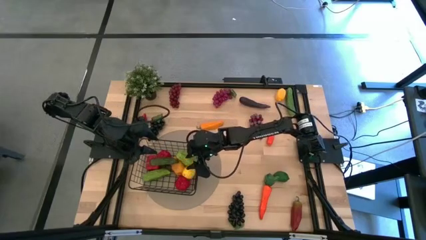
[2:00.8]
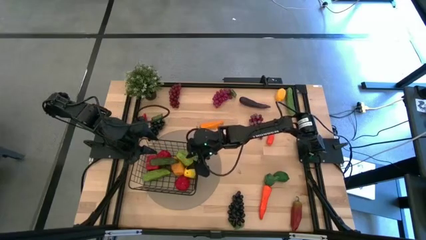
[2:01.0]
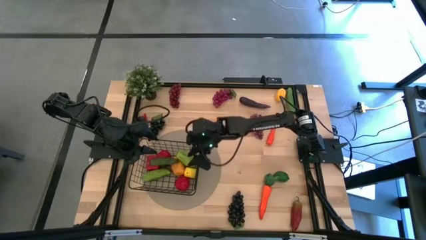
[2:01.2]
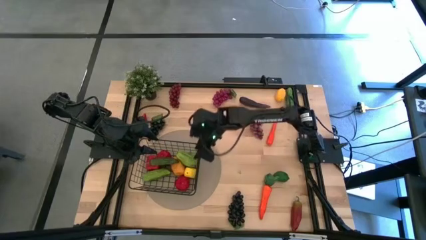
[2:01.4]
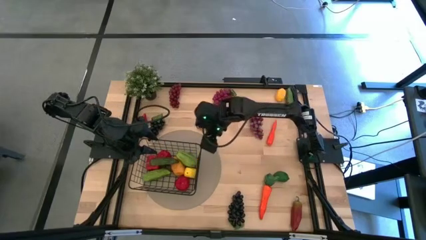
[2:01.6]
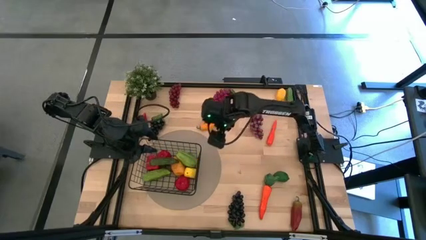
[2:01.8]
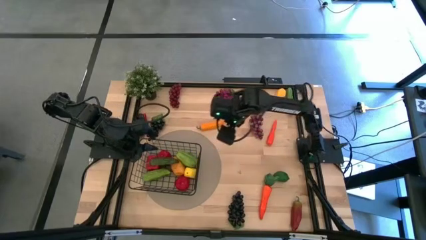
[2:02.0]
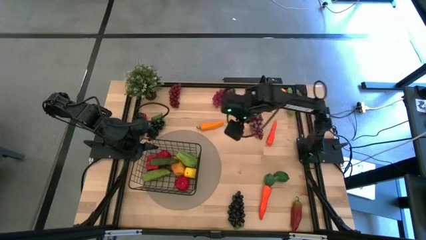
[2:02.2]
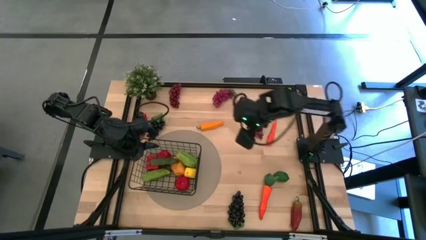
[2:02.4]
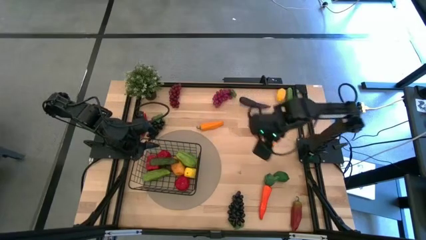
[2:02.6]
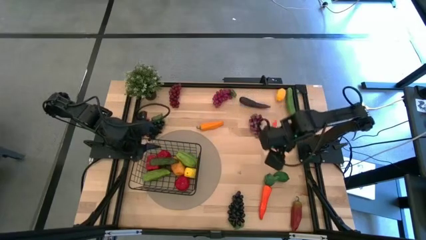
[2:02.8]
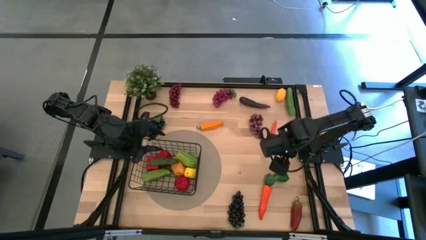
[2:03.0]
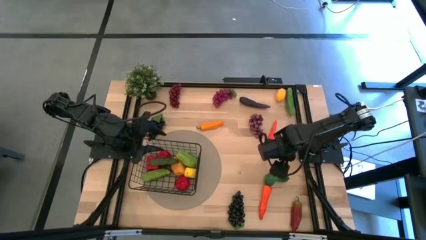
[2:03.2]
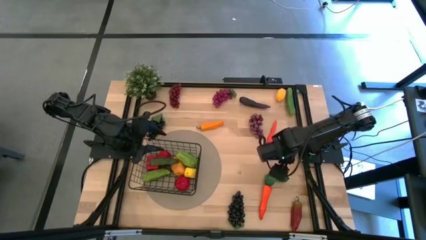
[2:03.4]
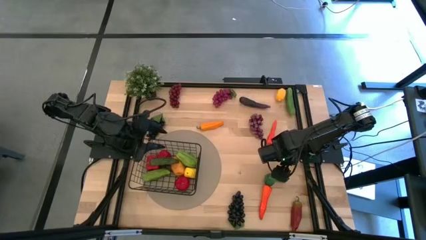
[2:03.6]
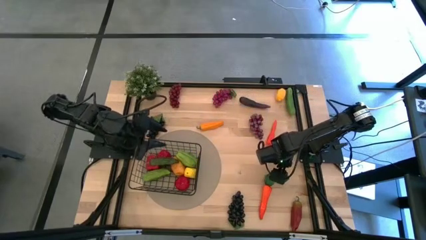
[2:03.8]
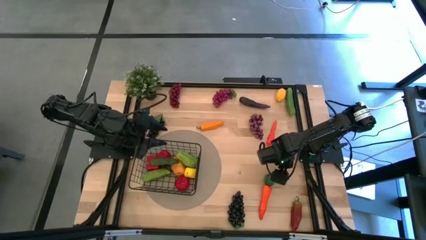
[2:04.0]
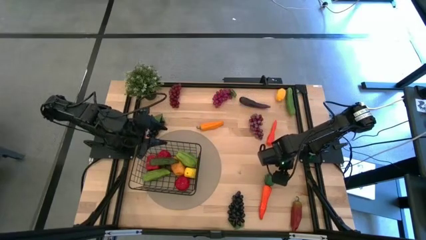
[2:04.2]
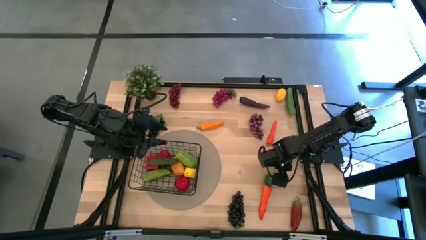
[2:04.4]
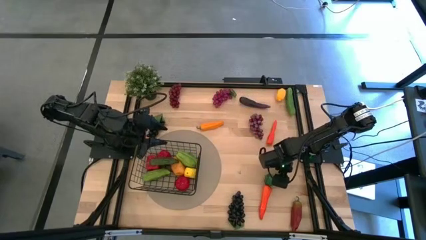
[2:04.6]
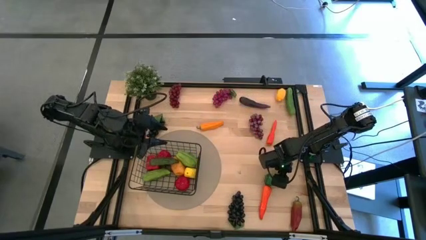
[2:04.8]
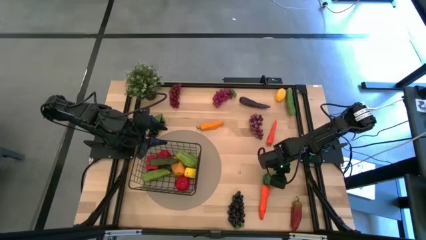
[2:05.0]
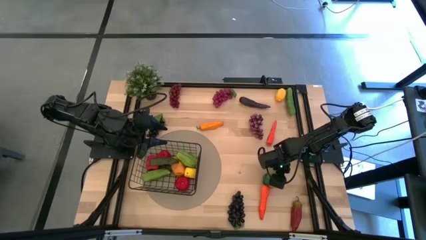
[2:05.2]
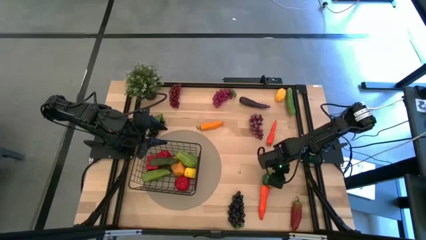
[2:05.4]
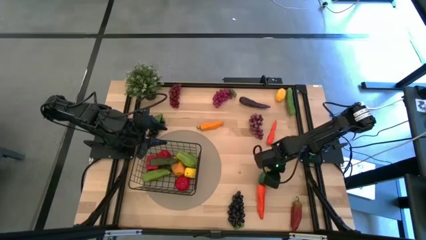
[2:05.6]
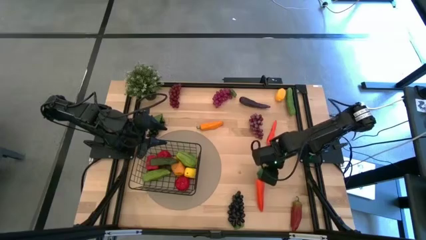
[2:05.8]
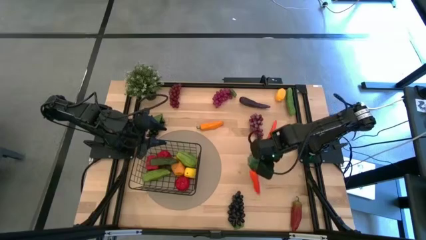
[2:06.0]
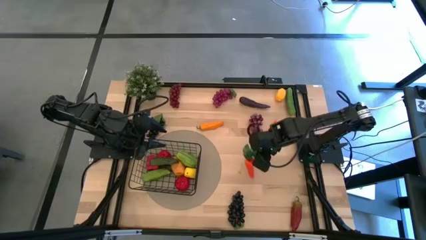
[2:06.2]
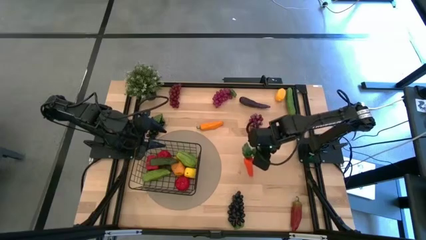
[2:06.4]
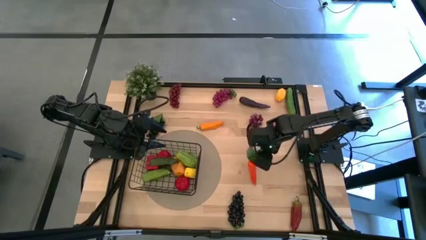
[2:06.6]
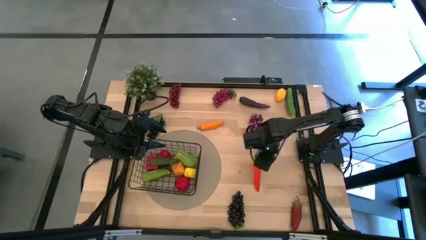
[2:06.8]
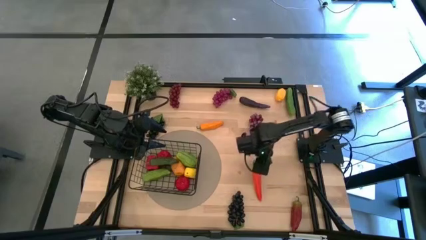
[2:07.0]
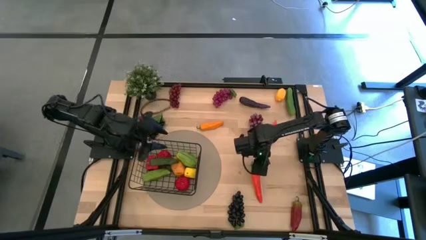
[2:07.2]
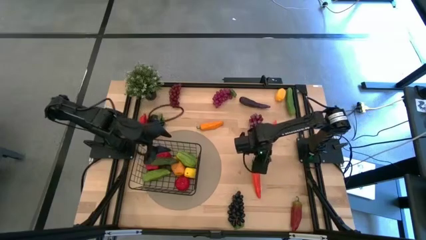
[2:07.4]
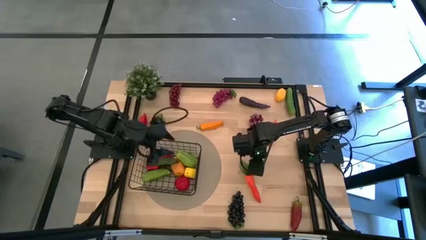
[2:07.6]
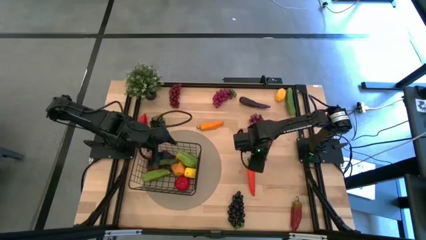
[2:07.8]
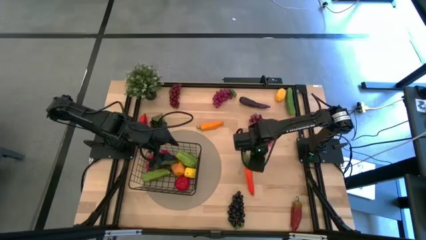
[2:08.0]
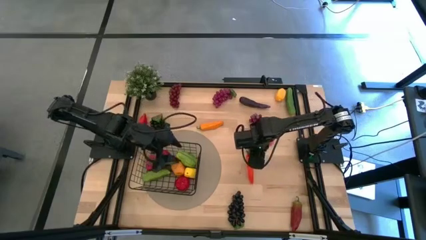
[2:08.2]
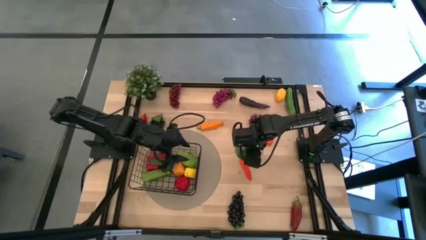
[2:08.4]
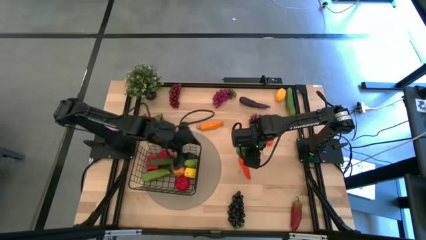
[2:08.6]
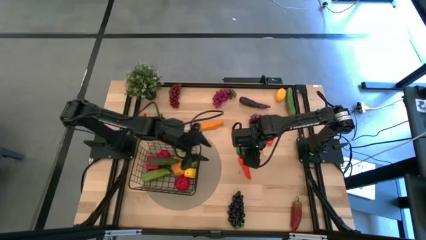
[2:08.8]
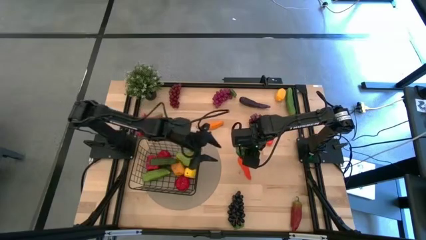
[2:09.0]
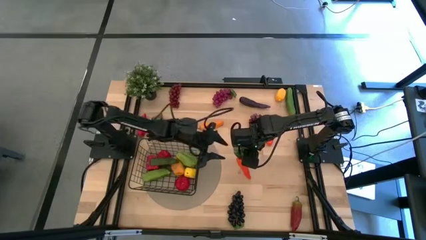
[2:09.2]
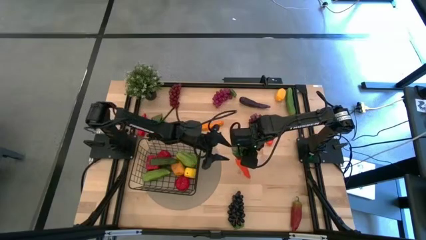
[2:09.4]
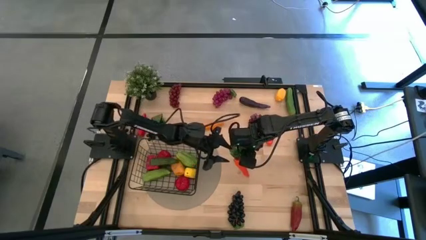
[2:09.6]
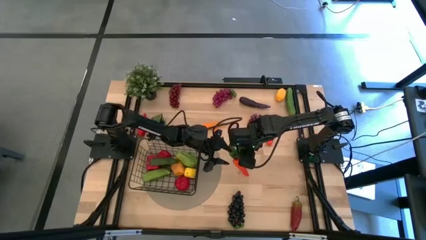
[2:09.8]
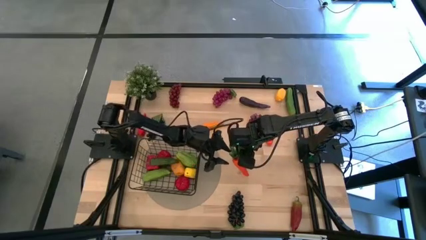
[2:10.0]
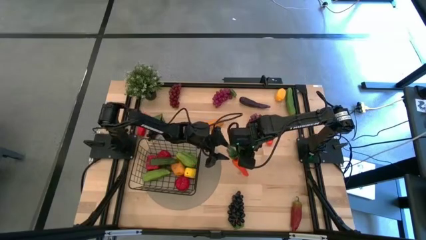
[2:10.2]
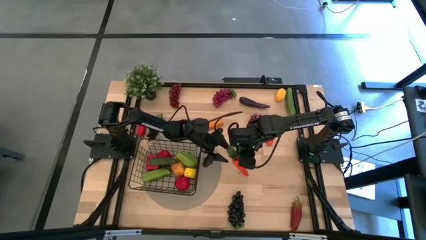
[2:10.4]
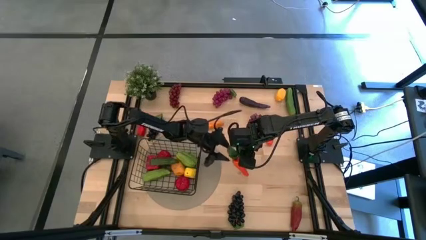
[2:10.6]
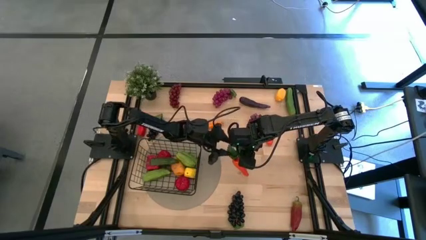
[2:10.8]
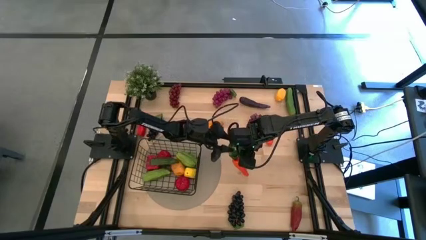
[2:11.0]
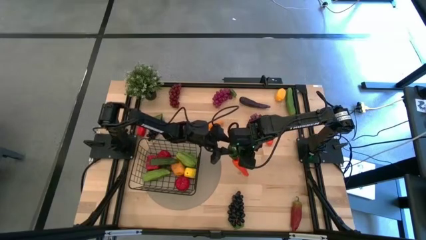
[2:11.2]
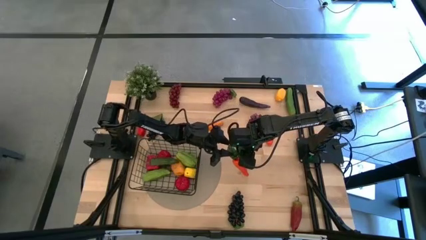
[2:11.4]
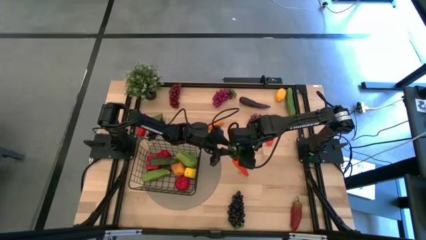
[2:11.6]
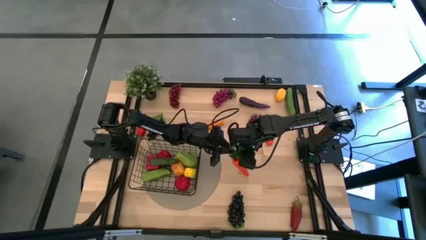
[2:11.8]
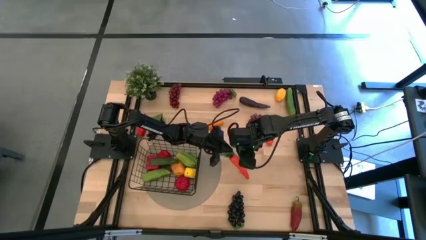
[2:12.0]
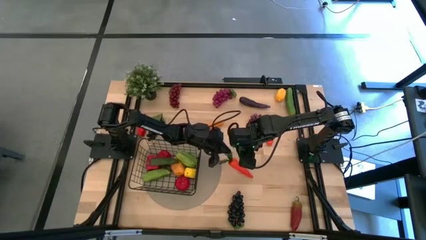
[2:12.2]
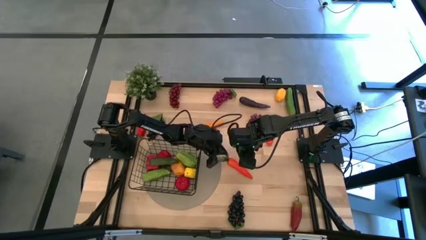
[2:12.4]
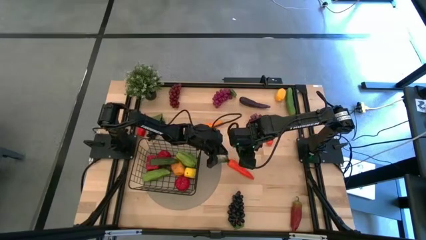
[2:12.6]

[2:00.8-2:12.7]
Task: Build produce basket
Put the green lime into the black wire basket

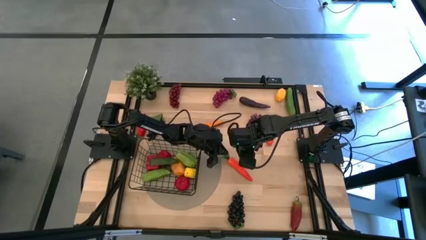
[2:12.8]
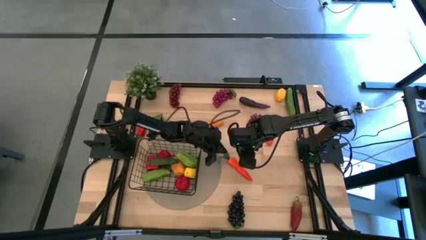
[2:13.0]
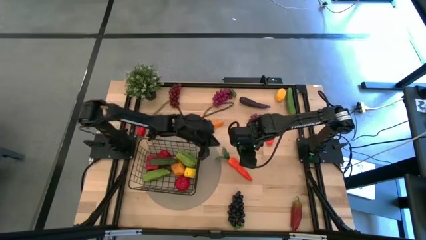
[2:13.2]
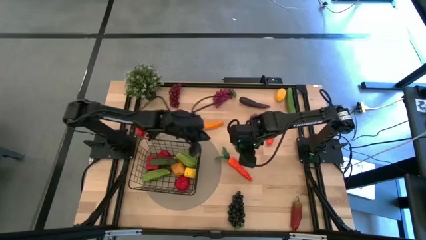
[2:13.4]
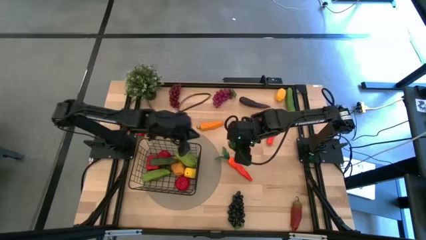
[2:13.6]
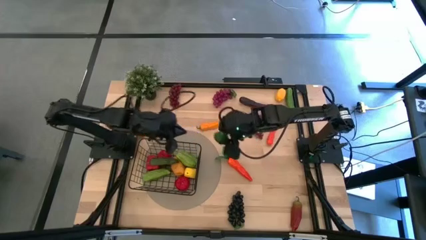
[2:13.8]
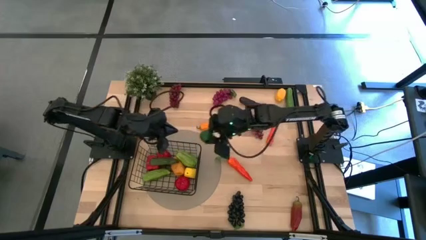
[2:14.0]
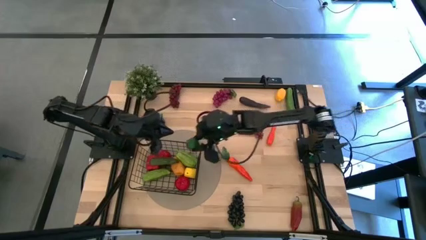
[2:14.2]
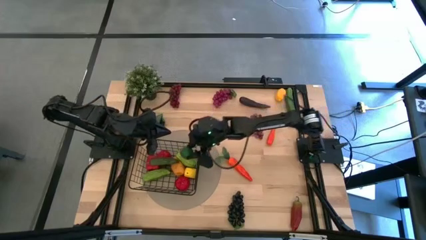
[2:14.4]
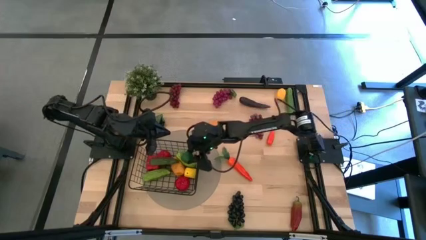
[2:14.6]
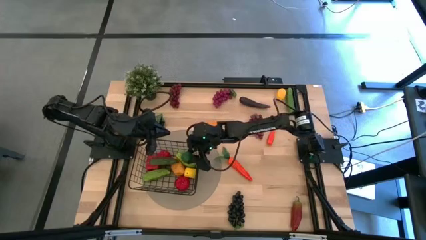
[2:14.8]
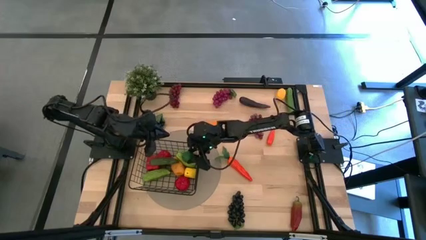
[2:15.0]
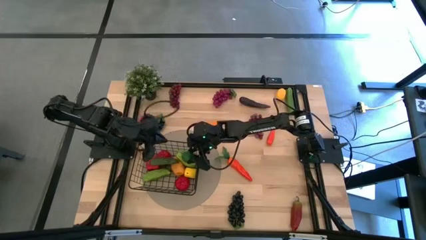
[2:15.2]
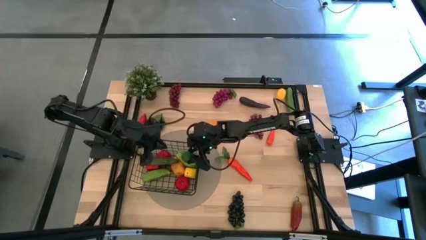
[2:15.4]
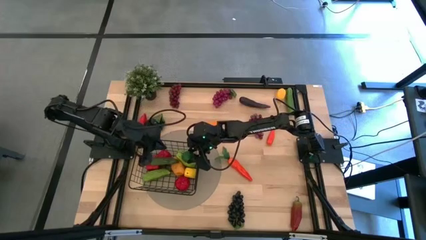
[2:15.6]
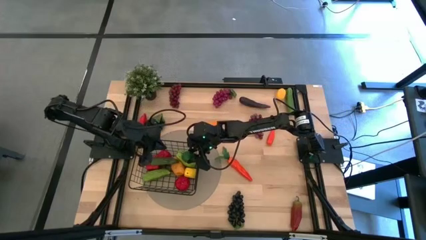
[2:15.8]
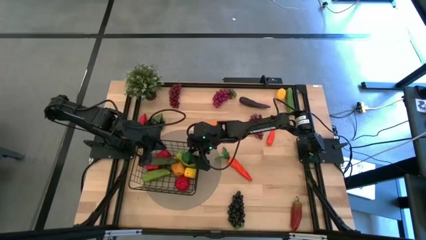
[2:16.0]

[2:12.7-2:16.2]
Put the green lime into the black wire basket
